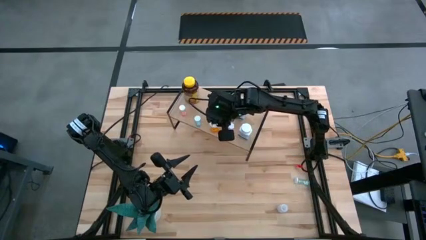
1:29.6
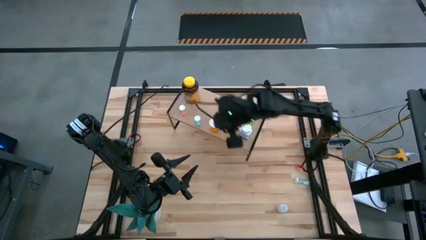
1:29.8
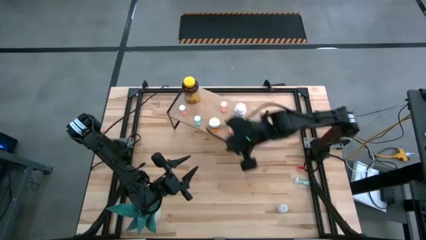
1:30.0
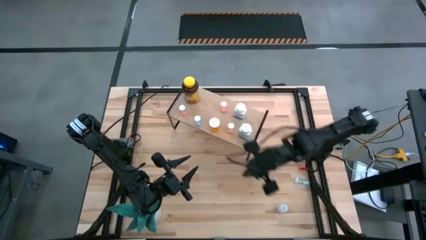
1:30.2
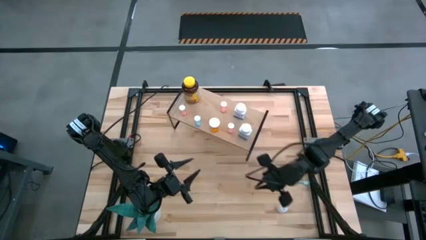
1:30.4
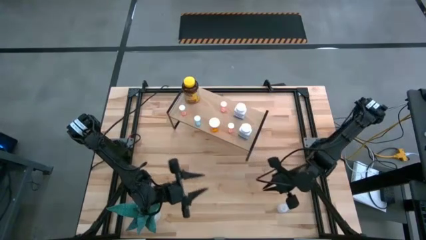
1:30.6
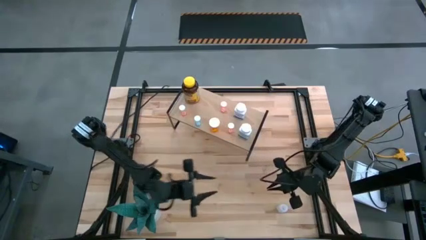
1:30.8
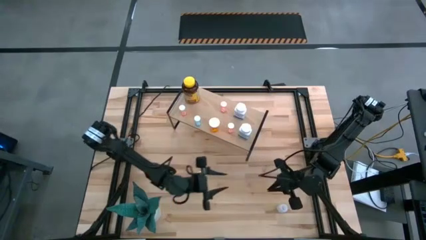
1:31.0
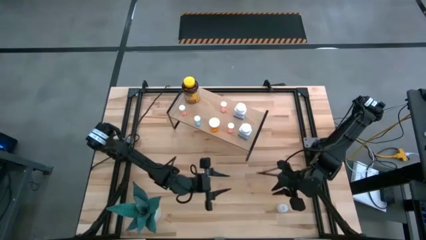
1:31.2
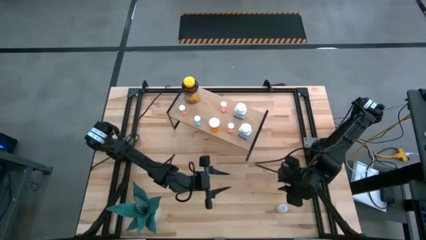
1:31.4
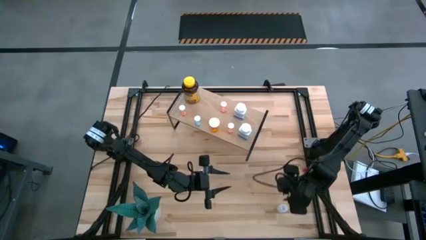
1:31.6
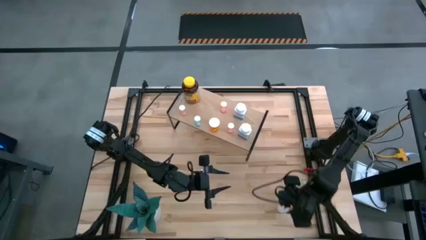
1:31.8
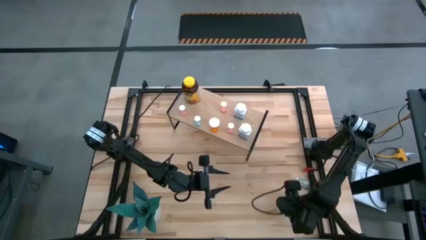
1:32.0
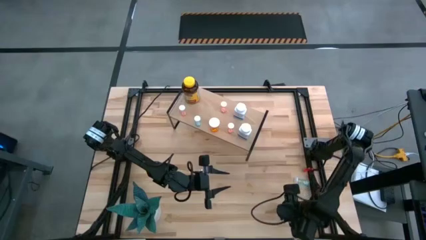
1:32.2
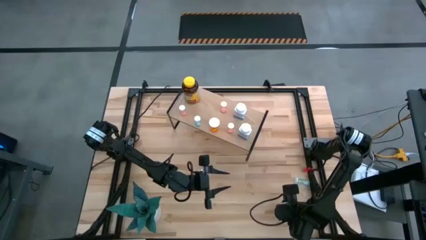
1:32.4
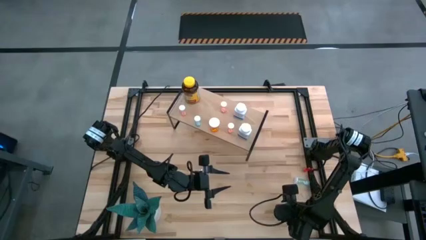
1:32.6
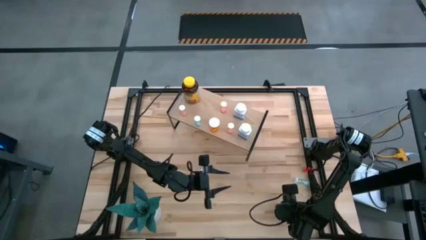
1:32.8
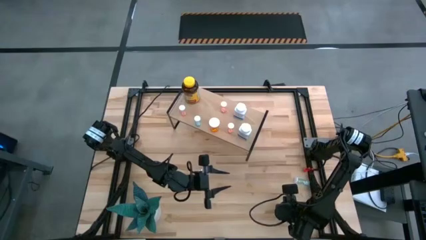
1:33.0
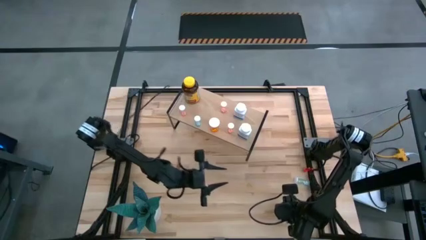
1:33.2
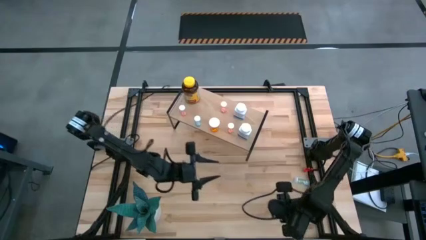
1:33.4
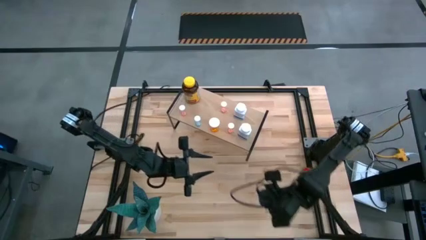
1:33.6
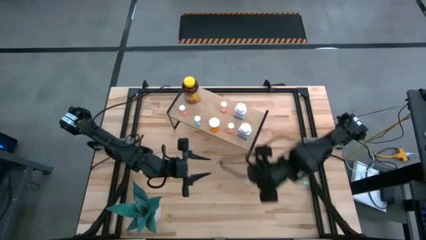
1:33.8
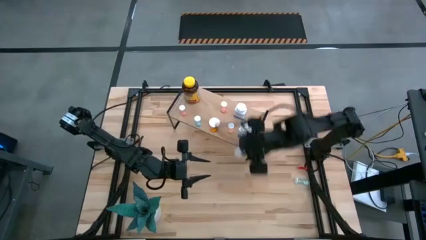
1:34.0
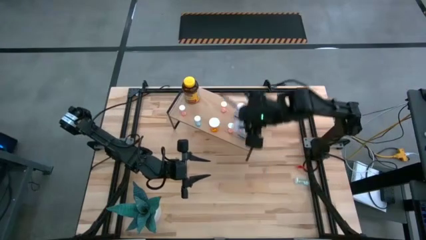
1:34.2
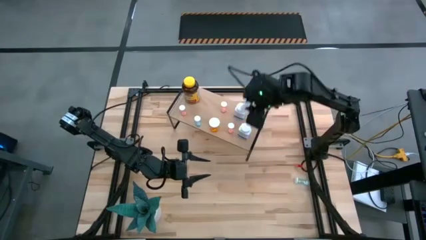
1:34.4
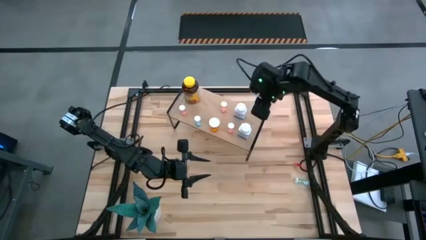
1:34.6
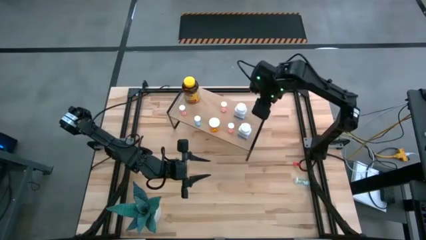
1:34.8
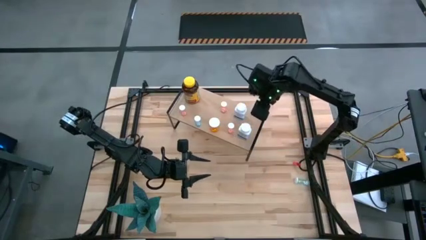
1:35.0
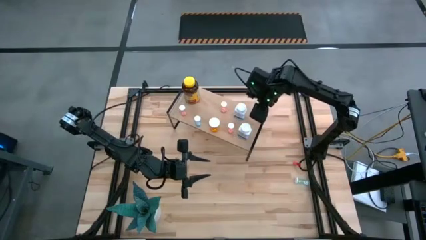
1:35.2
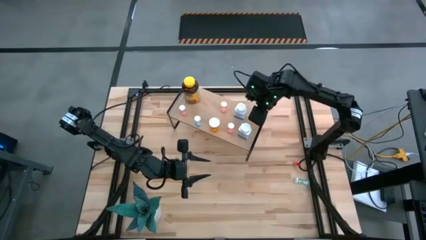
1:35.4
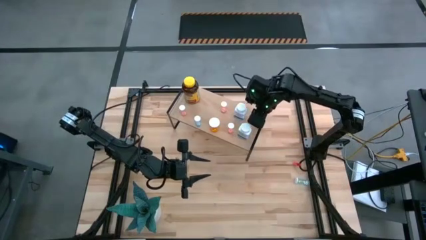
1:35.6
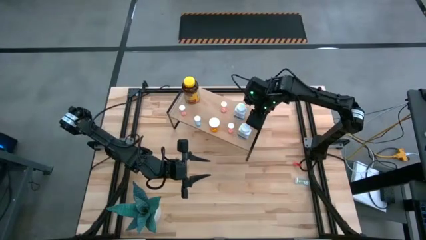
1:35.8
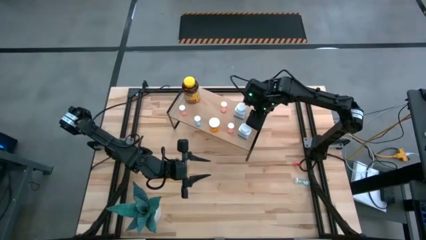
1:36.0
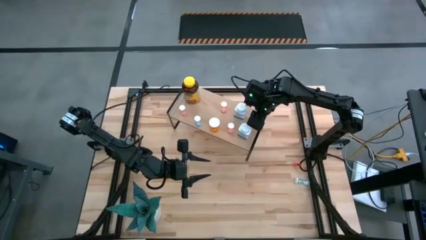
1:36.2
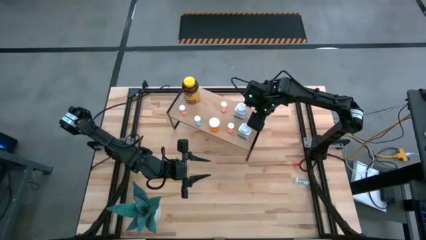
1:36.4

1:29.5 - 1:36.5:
Task: Pick and place medicine bottles onto shelf by color
Put the transparent pill bottle on the shelf

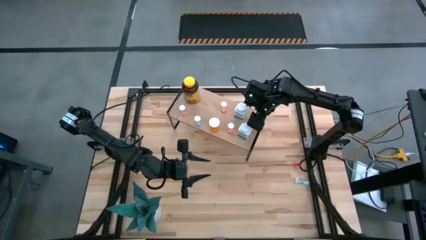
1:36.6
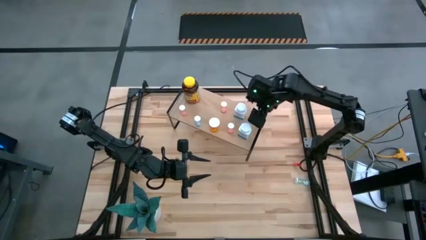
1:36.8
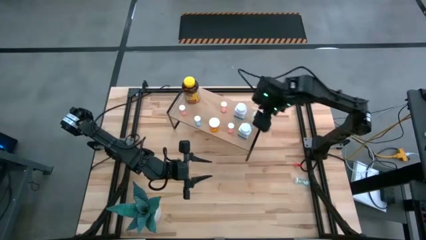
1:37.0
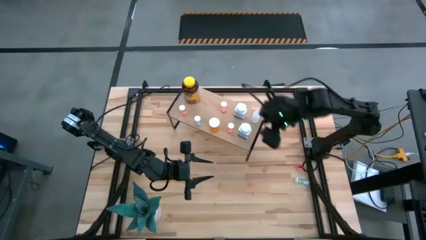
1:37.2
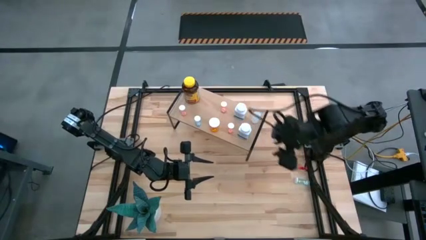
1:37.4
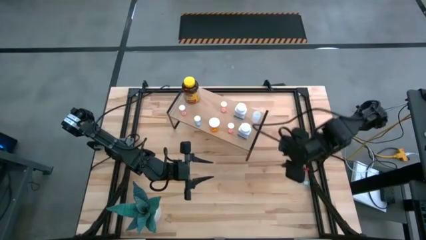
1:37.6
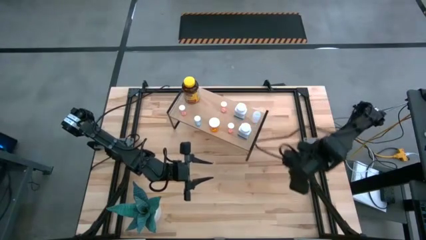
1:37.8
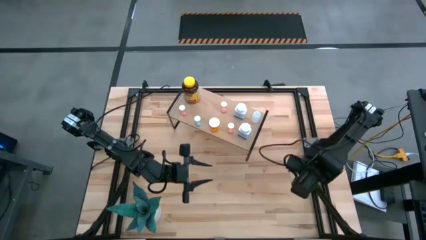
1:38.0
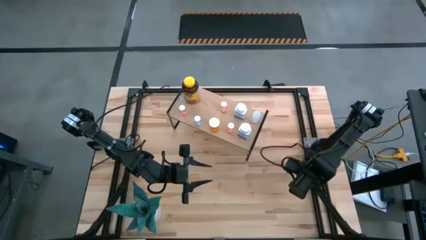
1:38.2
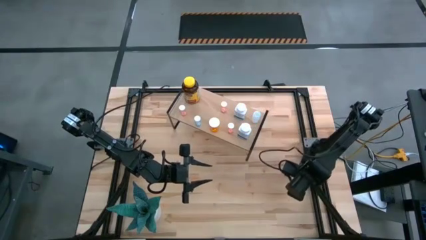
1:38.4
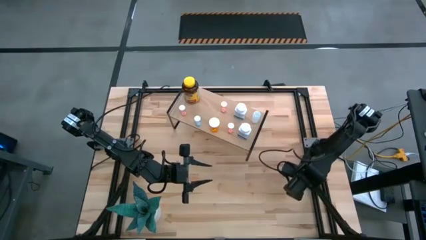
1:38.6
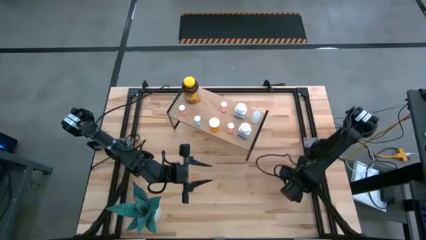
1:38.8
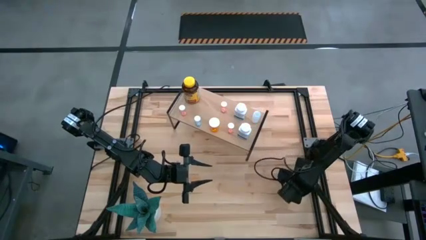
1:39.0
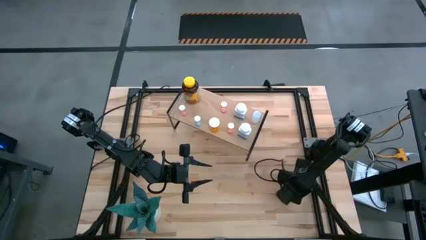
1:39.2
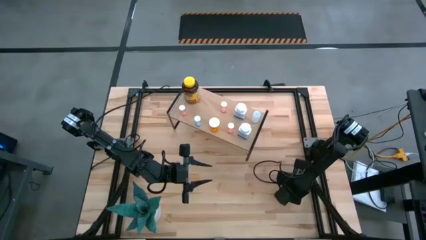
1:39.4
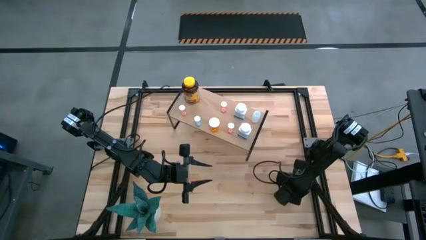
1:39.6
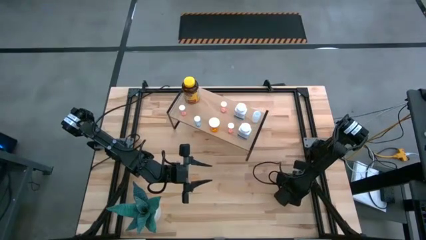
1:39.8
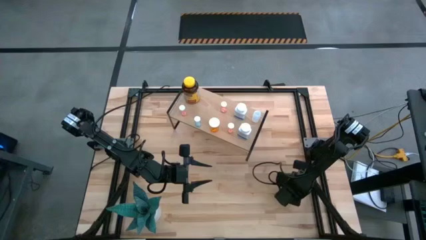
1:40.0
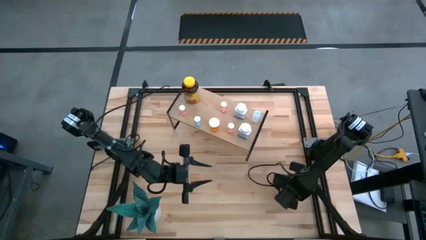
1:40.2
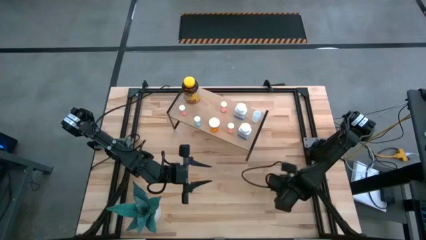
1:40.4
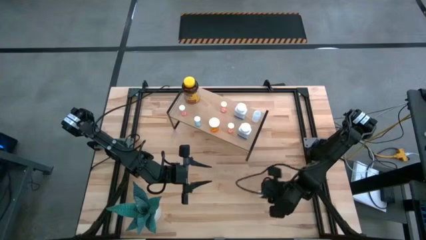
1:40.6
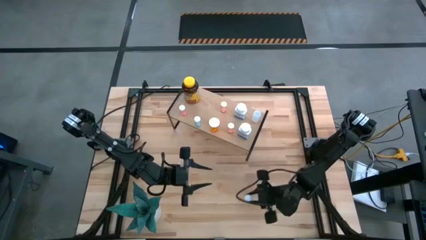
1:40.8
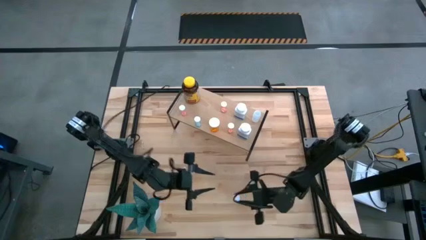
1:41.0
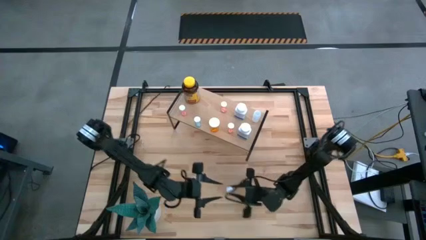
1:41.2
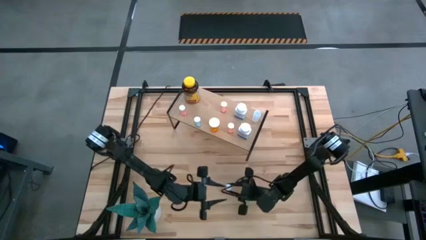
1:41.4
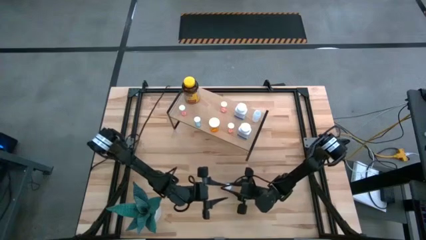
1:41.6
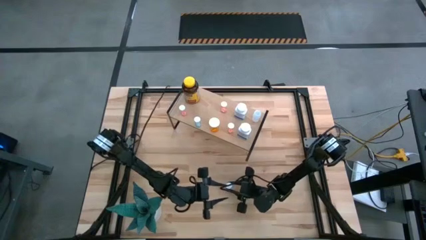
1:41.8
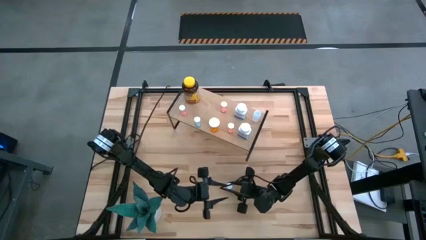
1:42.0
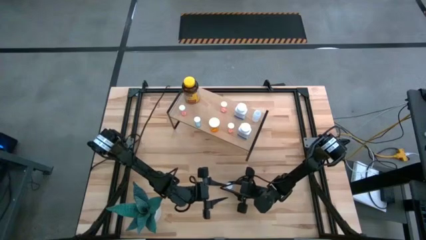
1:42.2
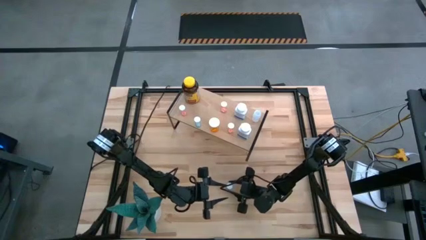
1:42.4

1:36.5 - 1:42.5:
Move the blue pill bottle to the middle of the table

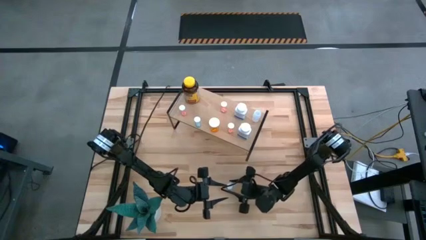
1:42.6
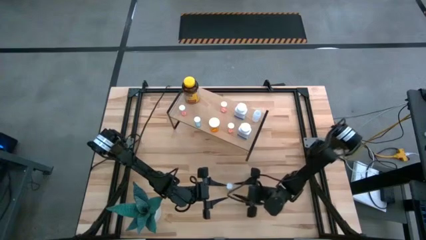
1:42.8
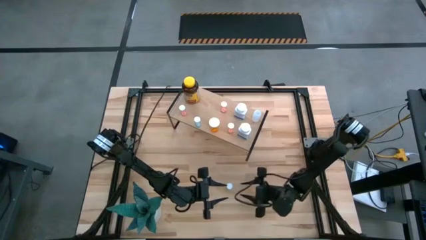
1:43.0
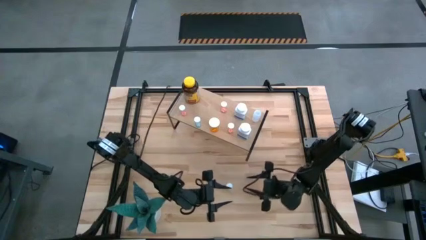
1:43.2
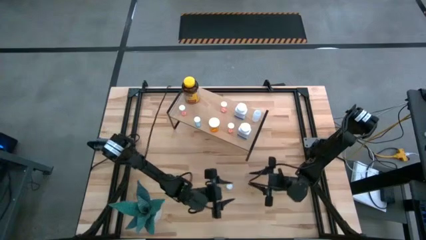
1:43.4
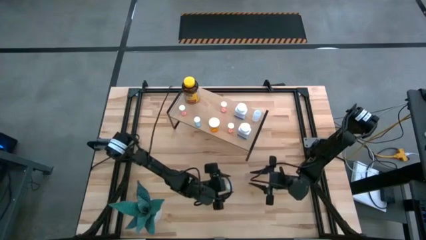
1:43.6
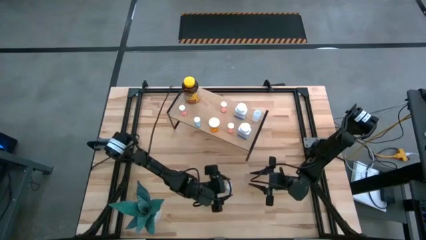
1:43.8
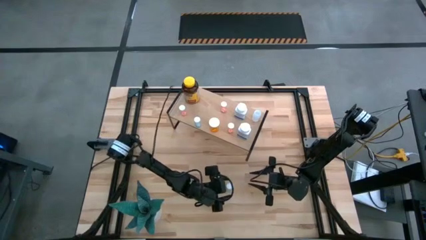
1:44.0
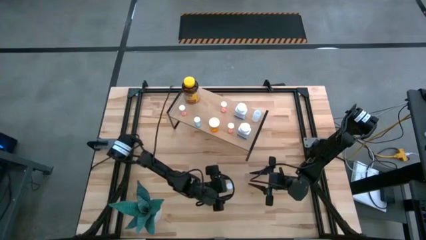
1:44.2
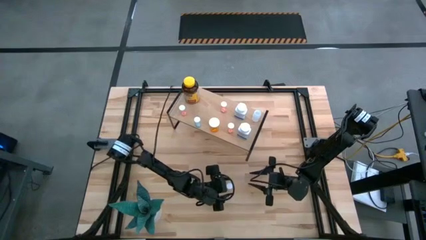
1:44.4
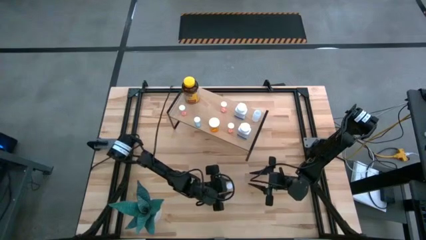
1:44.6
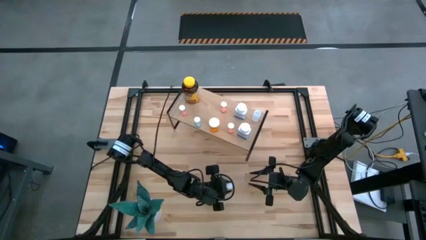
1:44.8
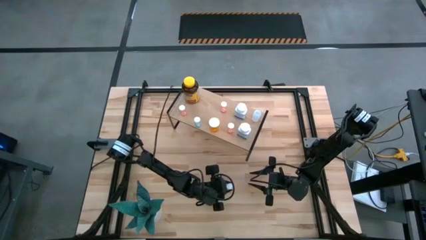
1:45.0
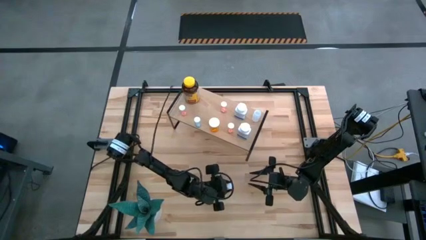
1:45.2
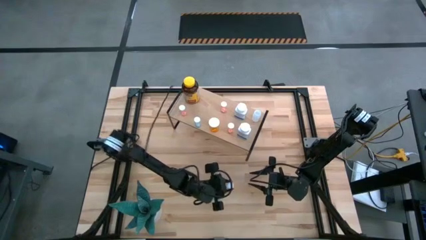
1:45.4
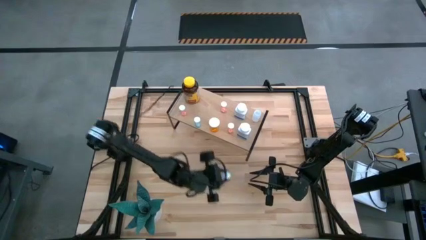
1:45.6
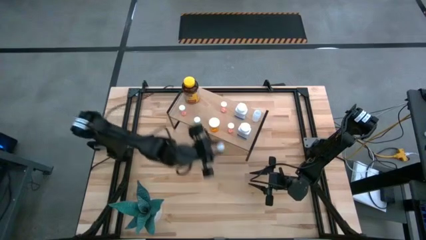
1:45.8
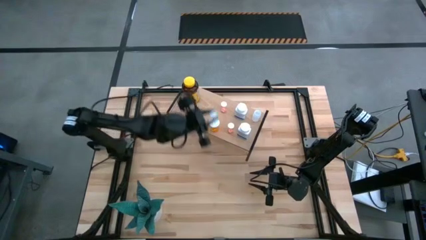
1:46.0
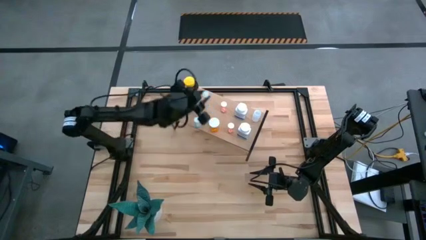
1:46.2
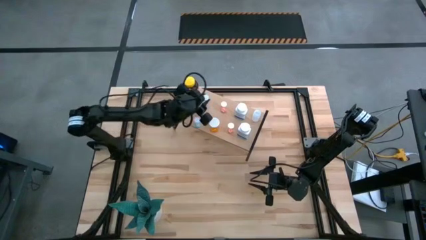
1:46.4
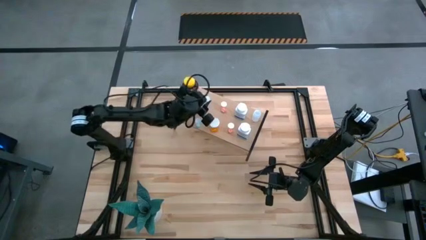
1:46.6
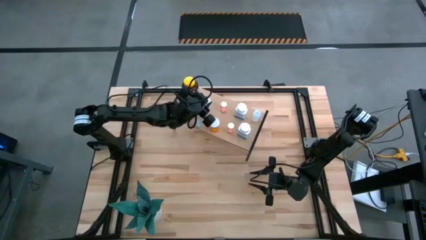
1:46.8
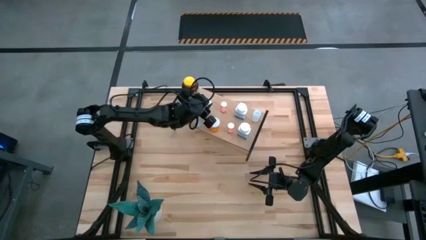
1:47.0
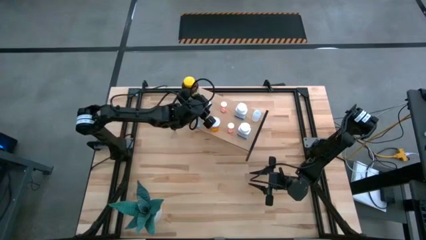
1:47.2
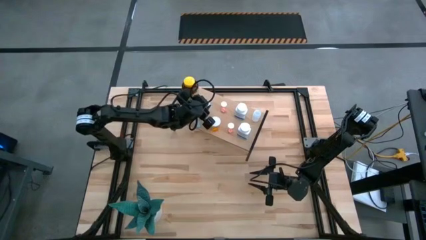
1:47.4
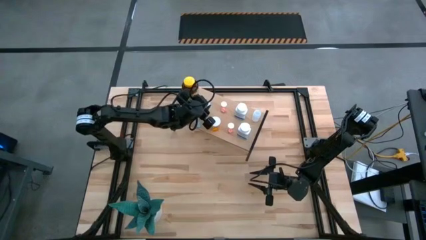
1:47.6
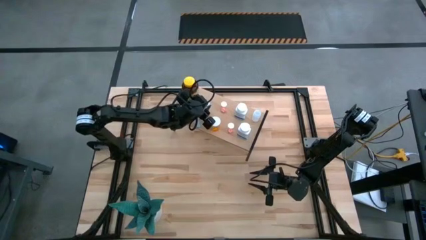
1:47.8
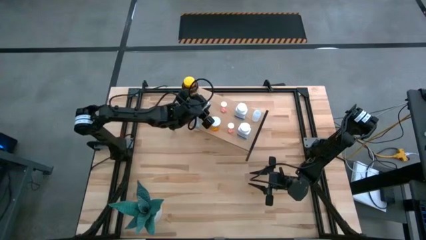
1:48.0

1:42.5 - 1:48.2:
Put the blue pill bottle on the shelf
